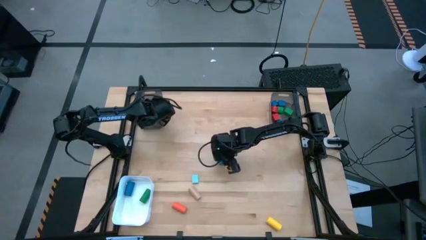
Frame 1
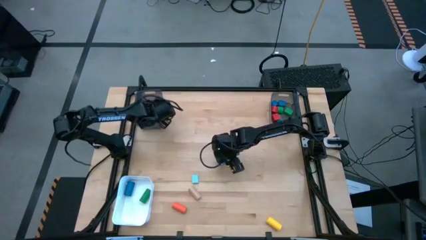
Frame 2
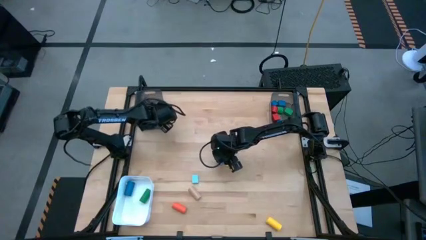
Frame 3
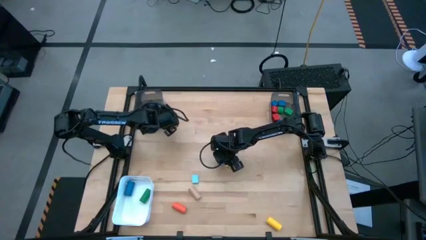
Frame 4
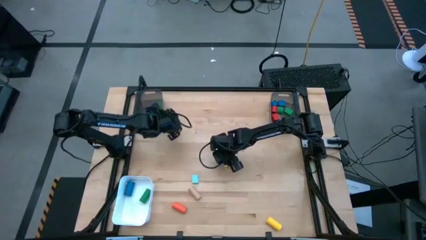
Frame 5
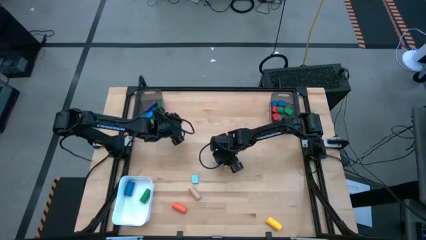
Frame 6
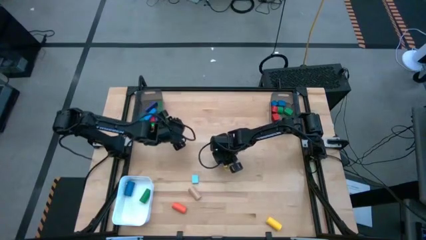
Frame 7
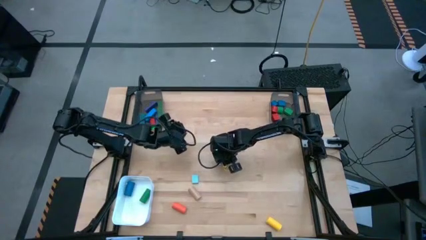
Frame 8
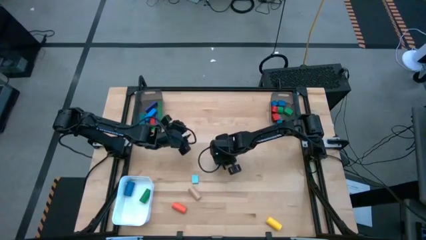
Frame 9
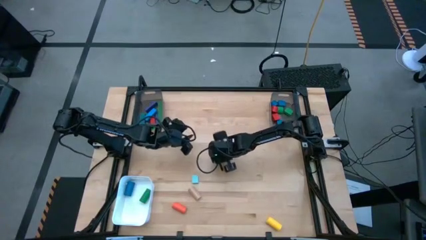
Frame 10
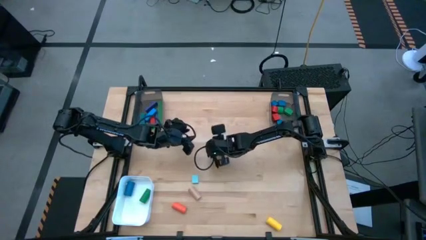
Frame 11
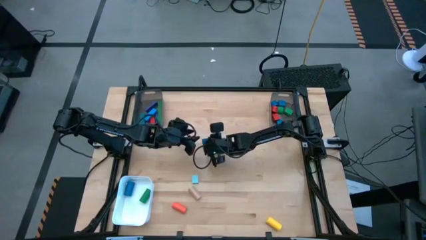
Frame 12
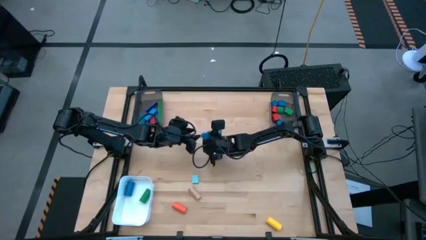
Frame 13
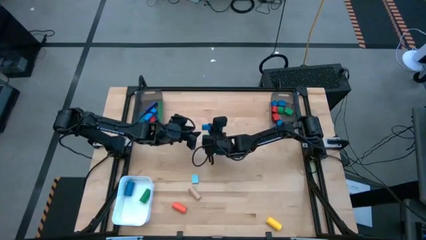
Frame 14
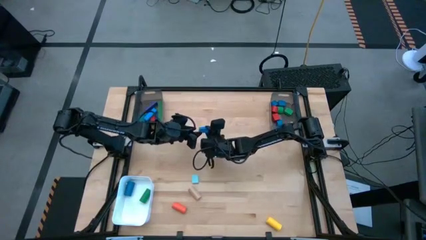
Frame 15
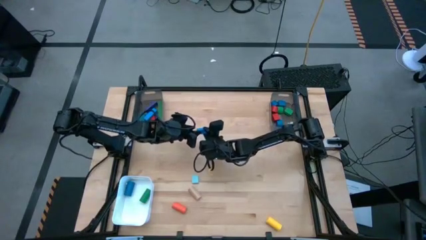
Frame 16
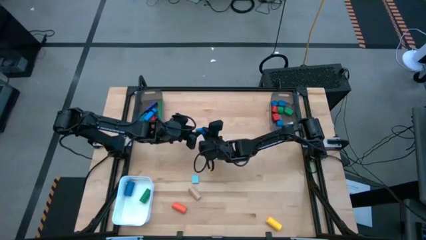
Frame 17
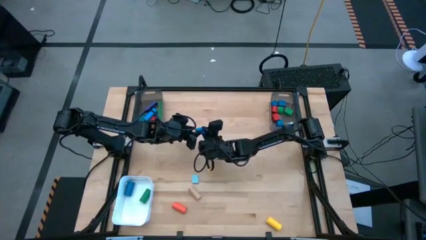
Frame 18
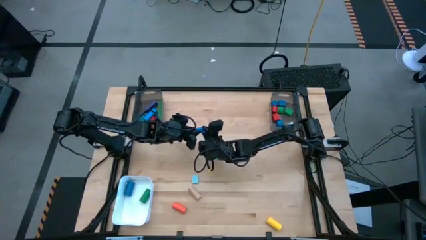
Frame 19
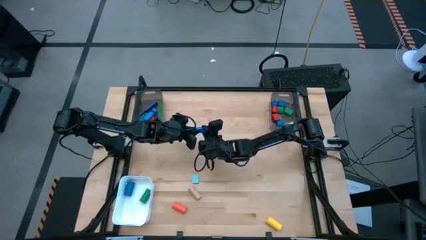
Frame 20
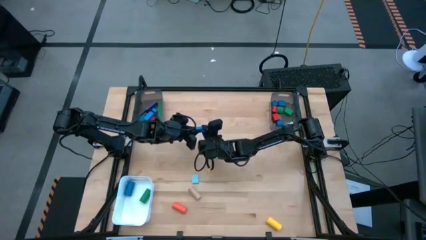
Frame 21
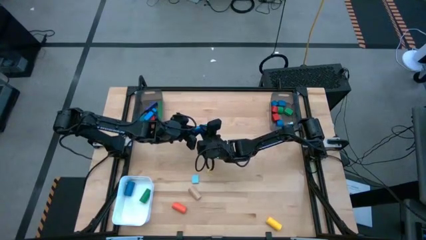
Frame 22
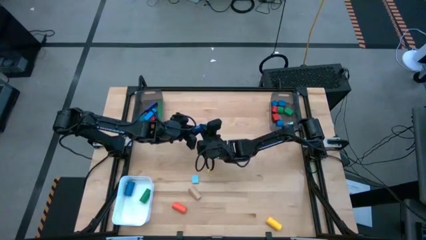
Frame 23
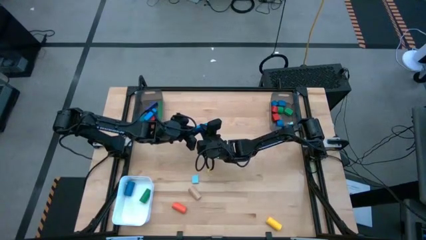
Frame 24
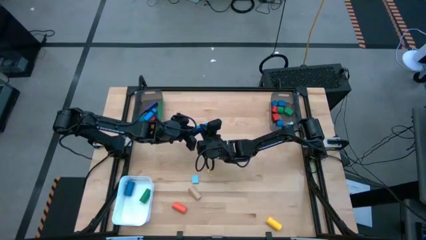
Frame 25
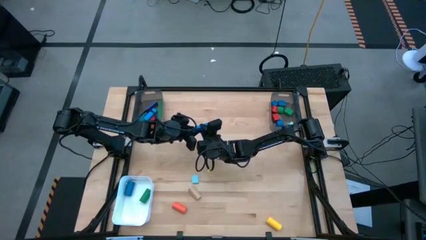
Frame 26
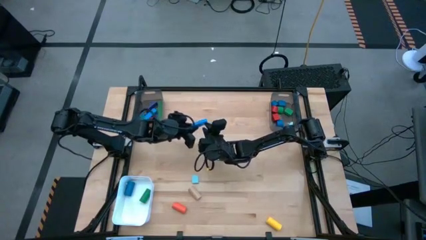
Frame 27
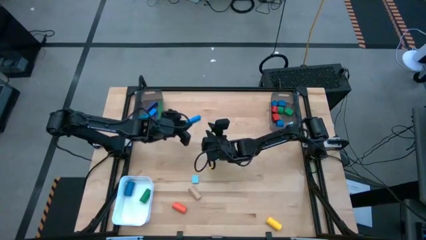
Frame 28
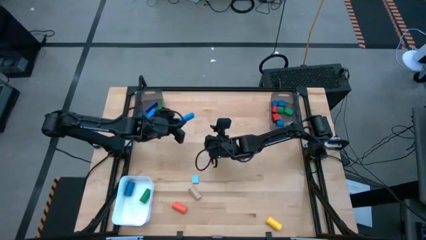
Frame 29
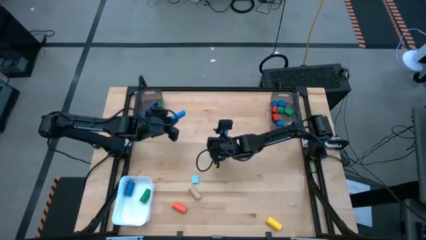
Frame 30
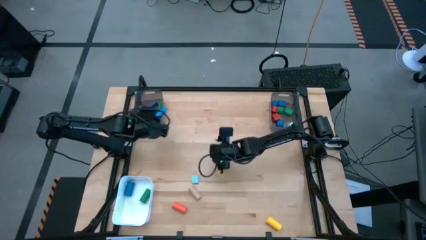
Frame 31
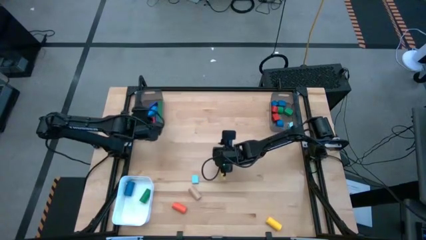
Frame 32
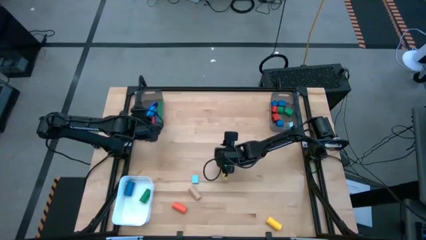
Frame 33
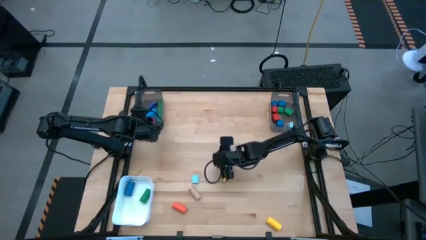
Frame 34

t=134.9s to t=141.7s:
Task: Sort blocks by size
Put the blue rectangular block into the left black bin

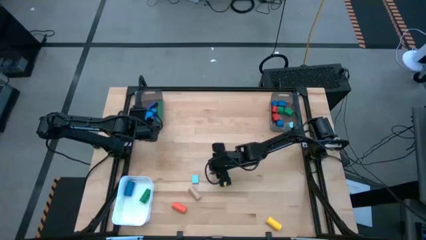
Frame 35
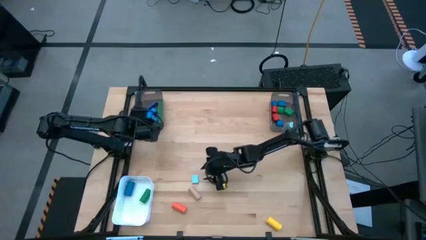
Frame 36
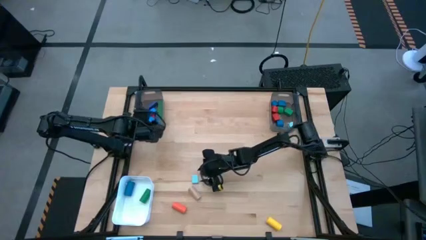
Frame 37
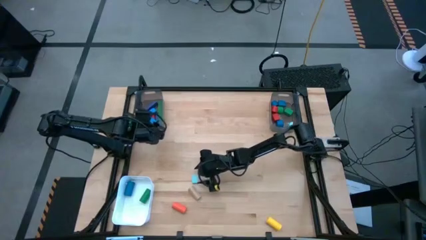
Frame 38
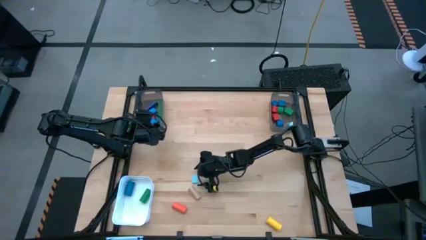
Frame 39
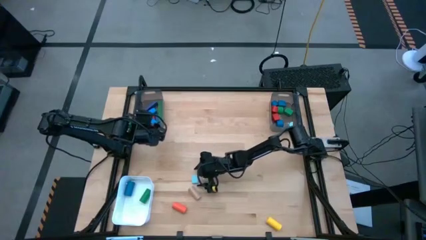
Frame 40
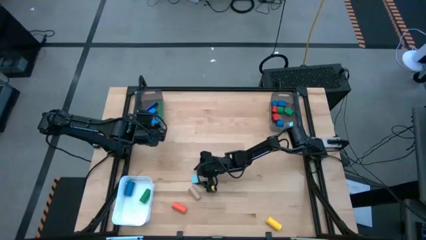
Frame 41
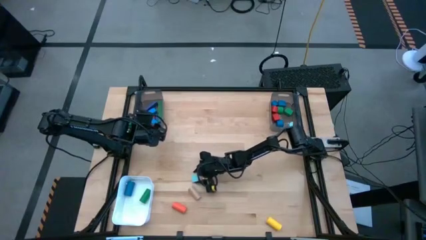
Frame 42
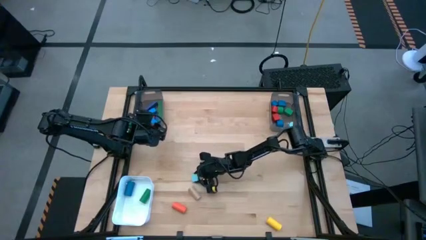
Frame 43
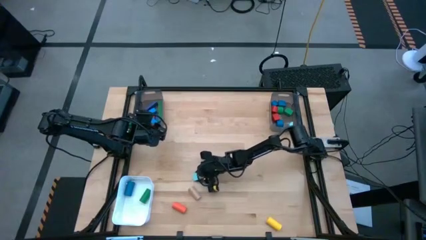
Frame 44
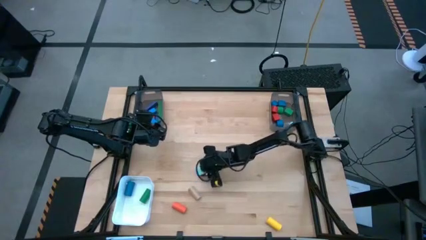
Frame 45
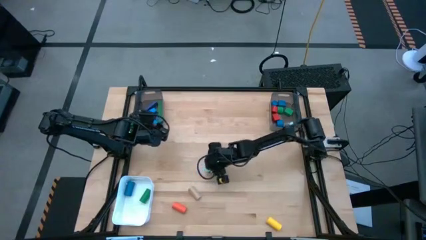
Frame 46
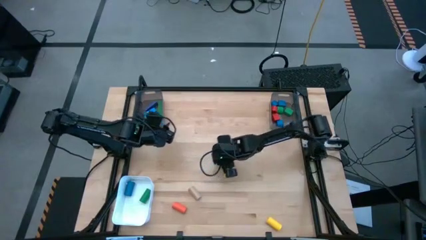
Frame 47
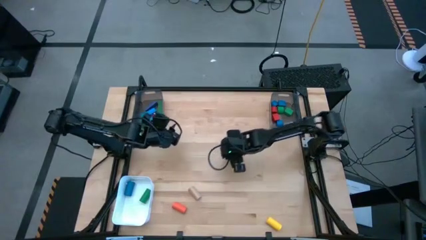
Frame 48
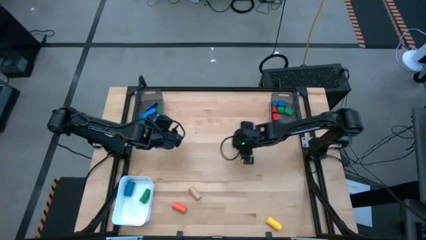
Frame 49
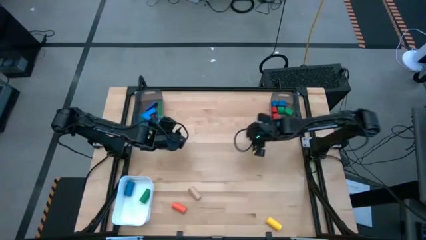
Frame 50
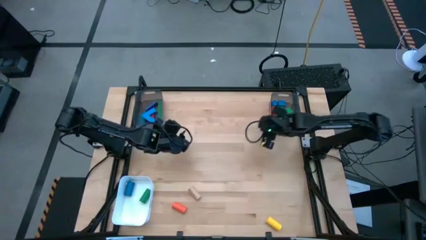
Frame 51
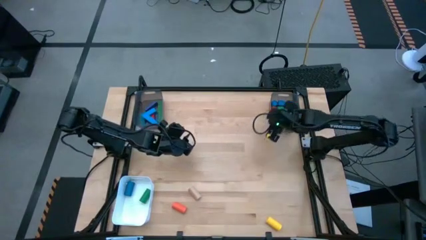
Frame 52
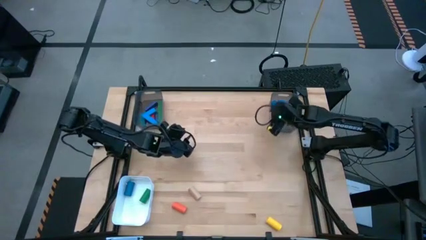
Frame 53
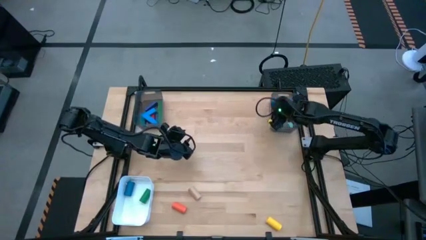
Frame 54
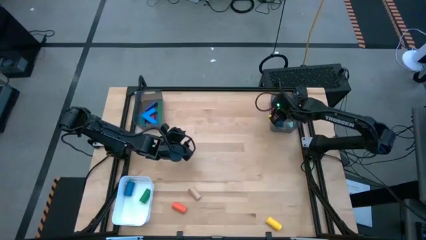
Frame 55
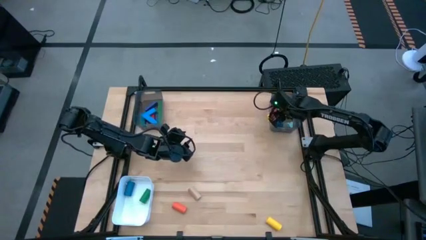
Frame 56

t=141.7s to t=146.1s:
Put the light blue half circle block into the right black bin

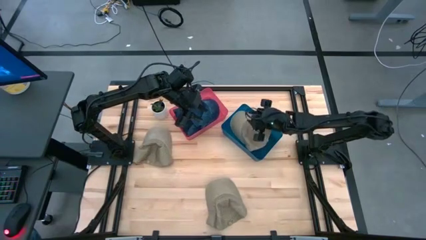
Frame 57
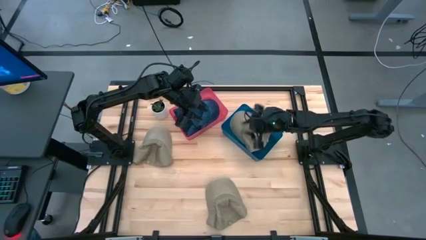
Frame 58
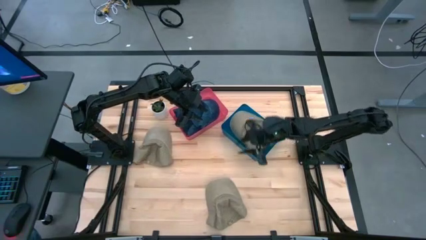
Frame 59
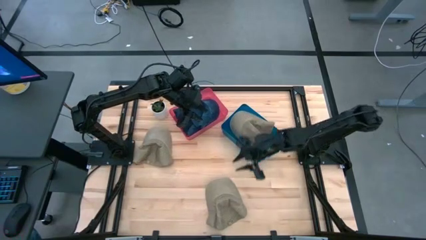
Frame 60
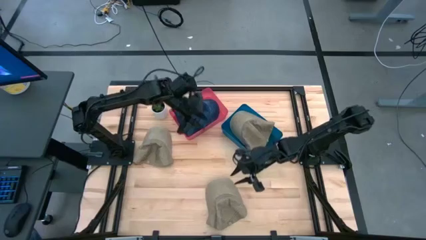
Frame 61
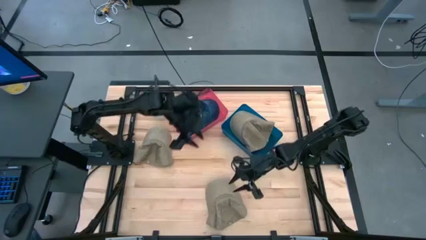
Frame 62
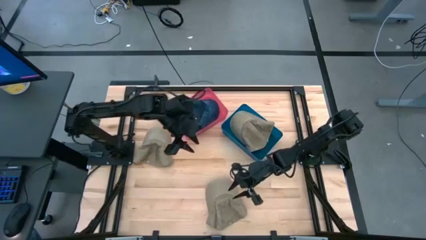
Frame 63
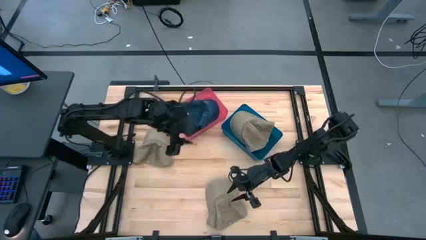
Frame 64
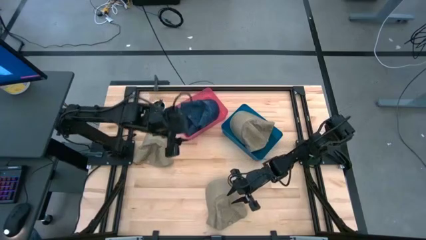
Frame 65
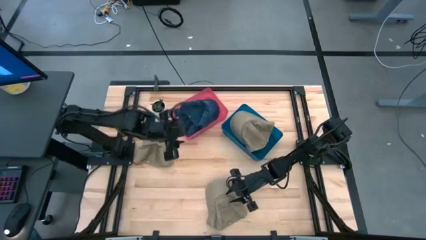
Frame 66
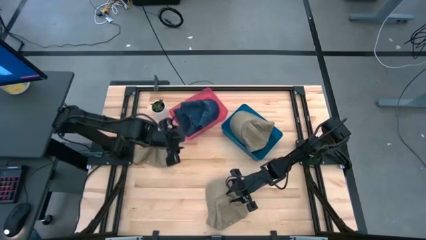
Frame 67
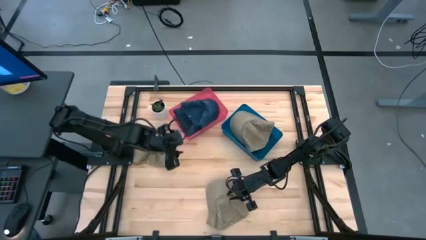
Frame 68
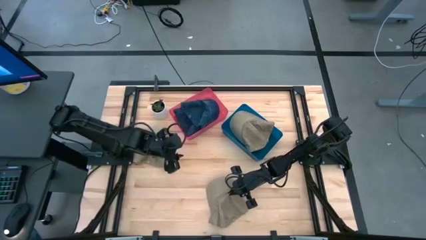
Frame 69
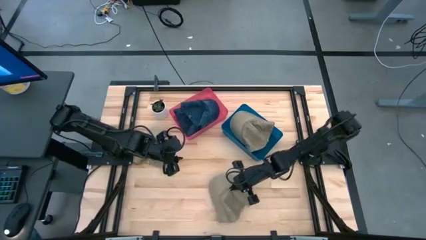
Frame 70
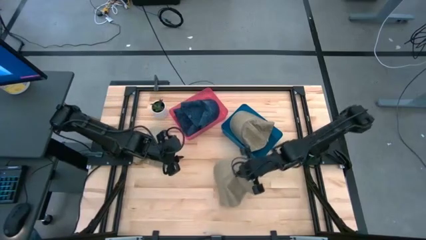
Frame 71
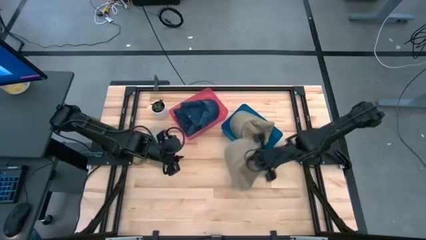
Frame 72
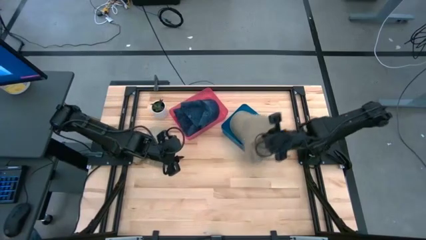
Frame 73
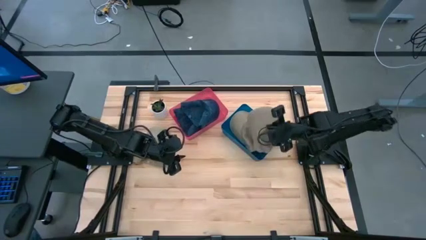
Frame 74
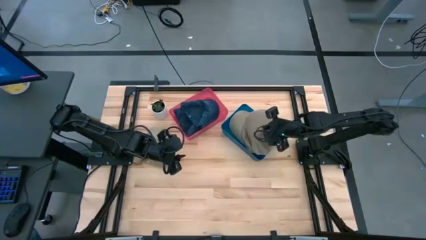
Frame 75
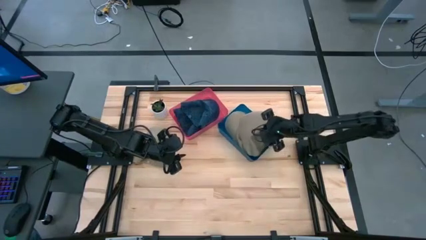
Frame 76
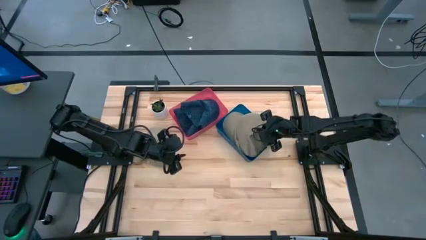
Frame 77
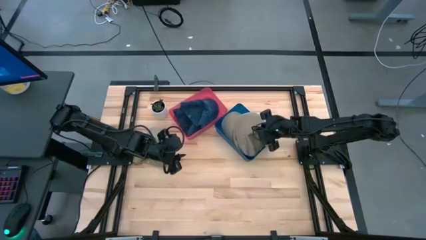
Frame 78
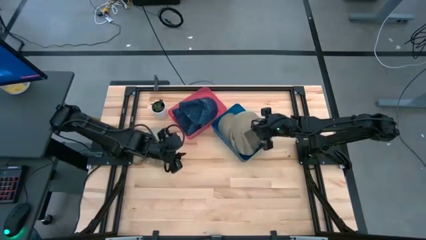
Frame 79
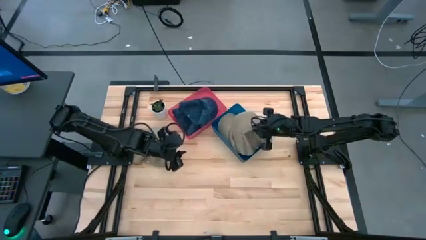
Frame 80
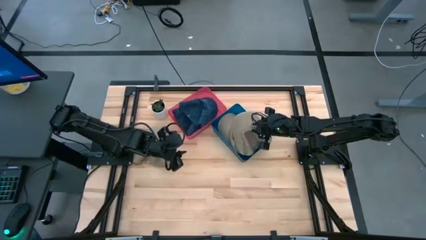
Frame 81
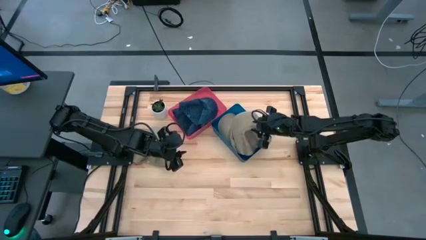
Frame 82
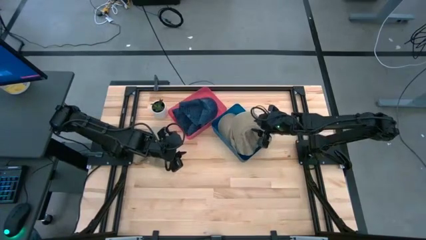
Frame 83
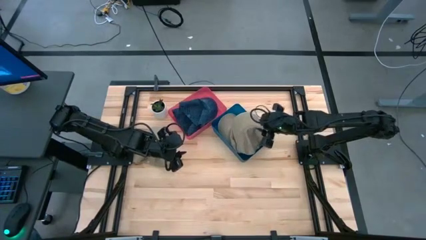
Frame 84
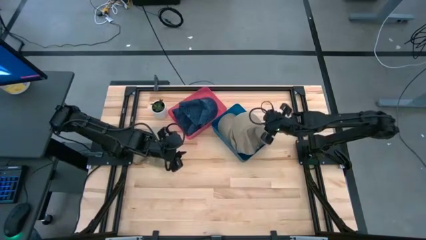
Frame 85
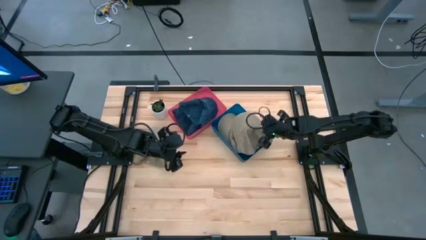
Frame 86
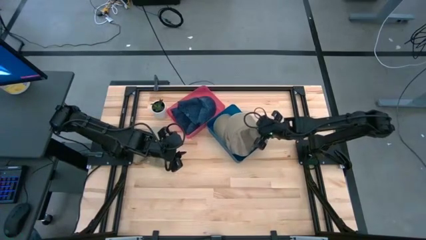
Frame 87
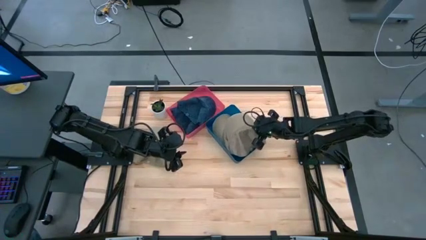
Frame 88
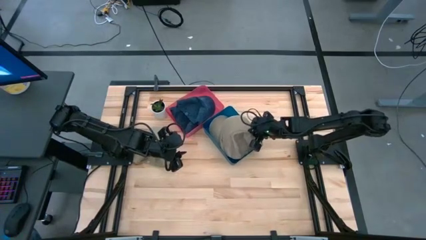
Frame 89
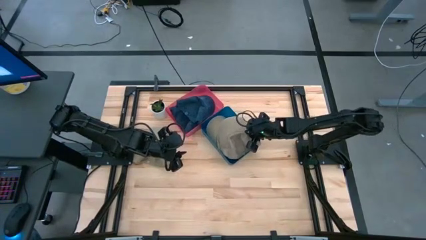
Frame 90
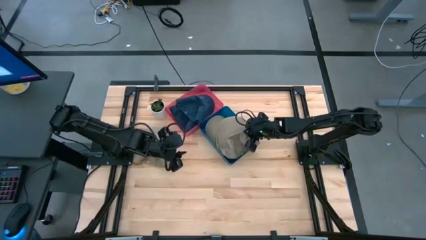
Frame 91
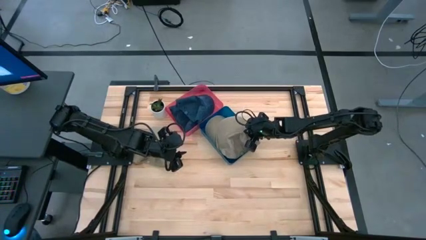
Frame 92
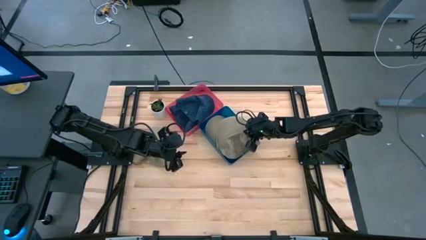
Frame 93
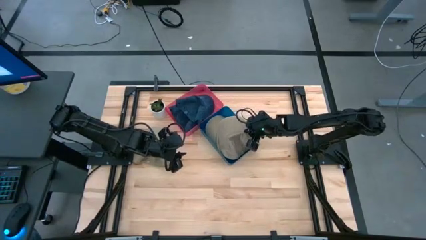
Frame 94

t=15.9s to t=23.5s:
Task: Pick & Place hat
Put the bottom brown cap into the blue bin
